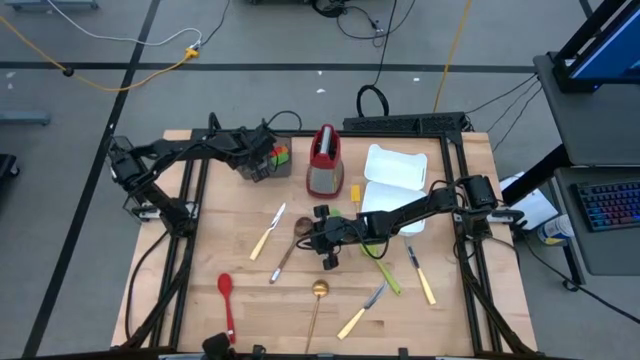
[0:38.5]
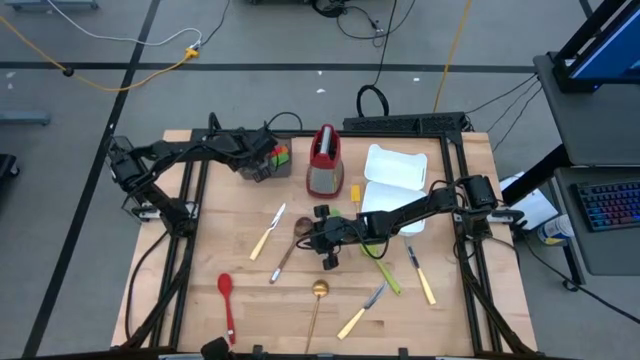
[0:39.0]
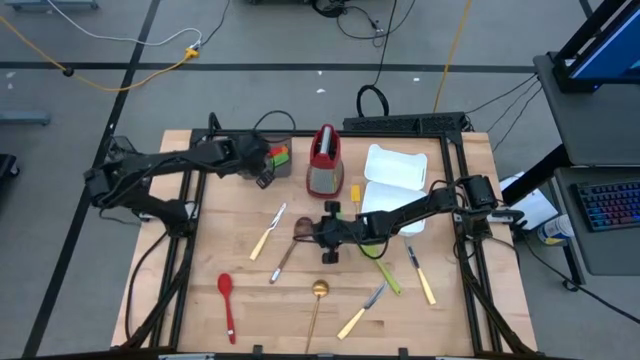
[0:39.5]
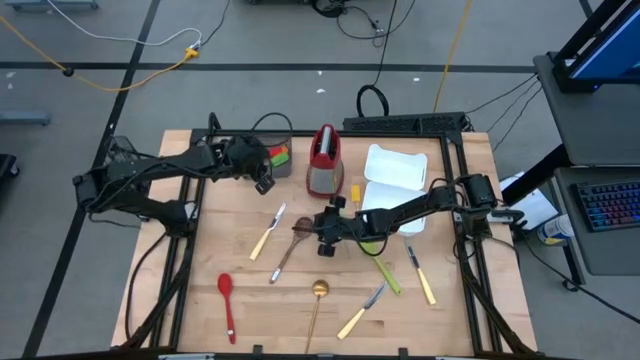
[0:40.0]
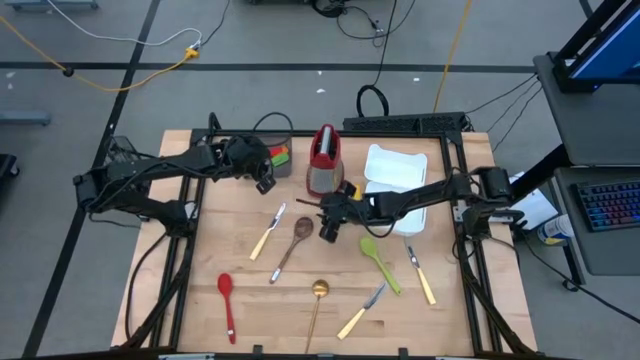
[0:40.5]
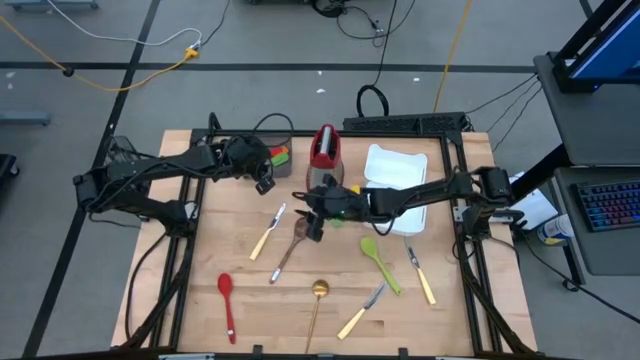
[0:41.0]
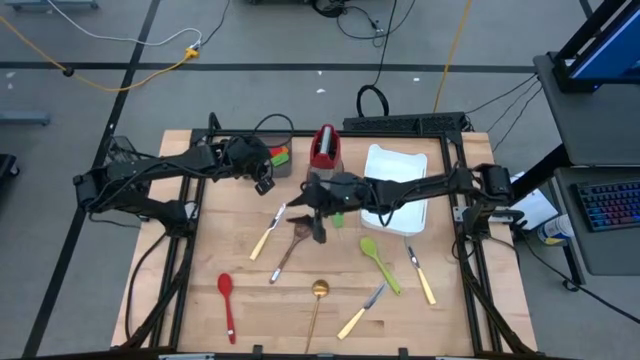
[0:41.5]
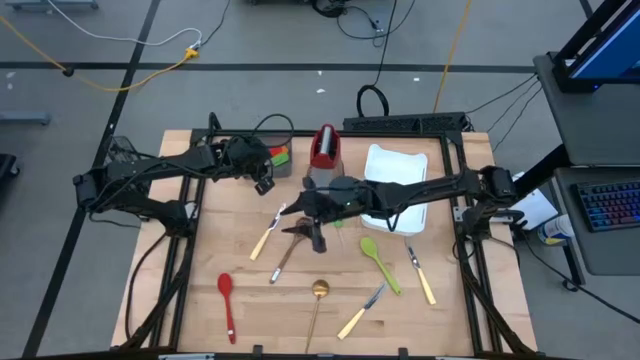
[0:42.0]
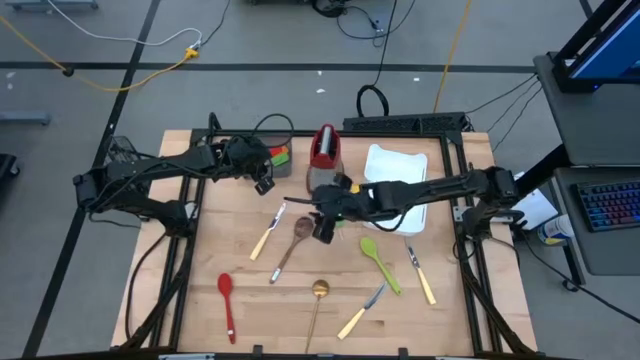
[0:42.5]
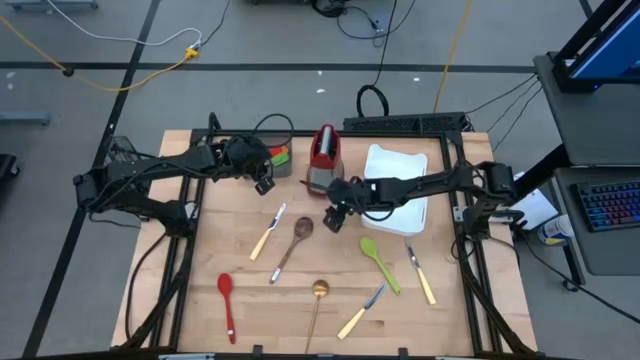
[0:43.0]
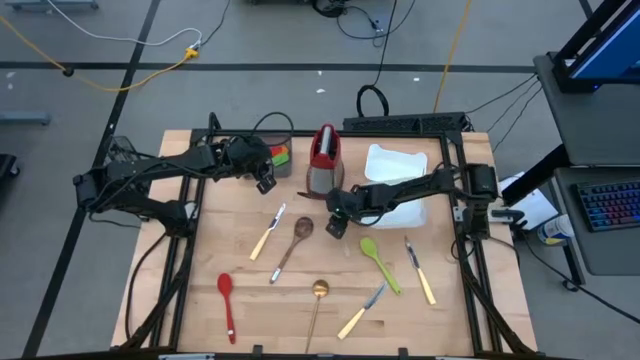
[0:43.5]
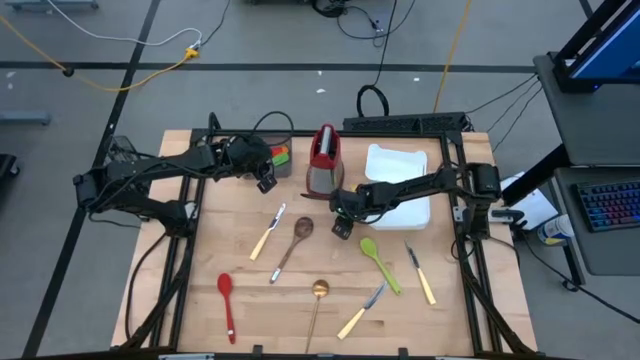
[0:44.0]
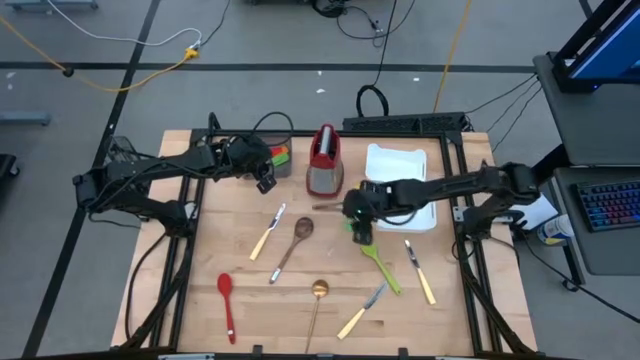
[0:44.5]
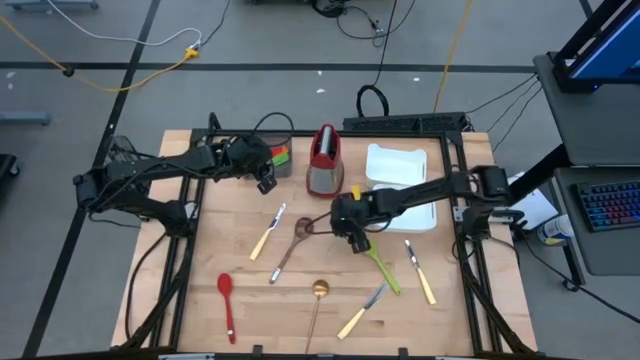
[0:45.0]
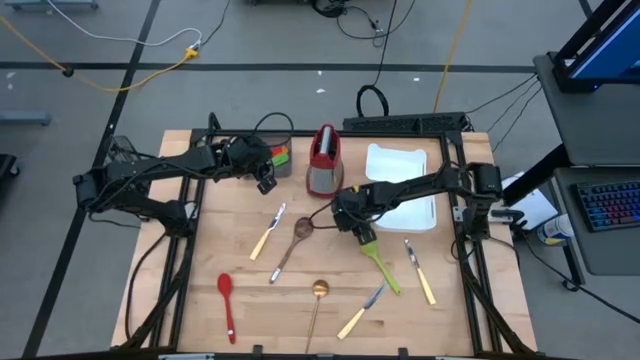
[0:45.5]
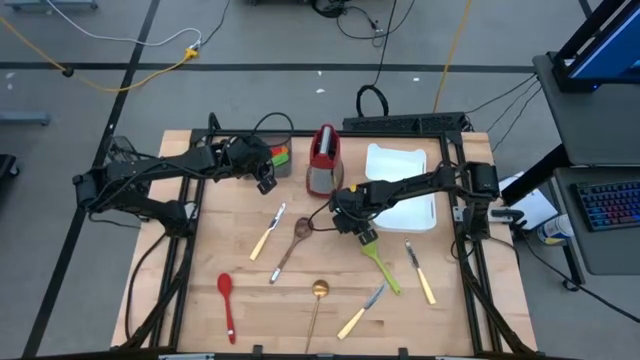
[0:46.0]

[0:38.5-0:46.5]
Task: Pick & Place Kitchen Items
Put the green spatula into the black bin

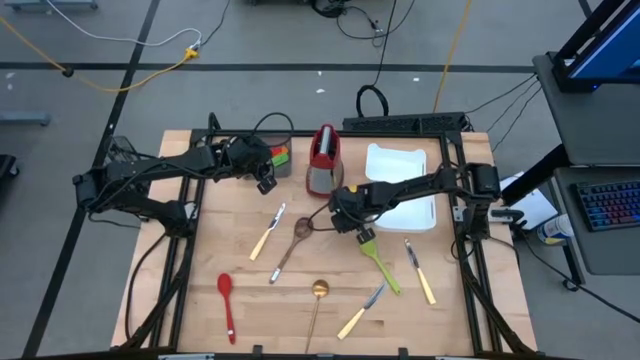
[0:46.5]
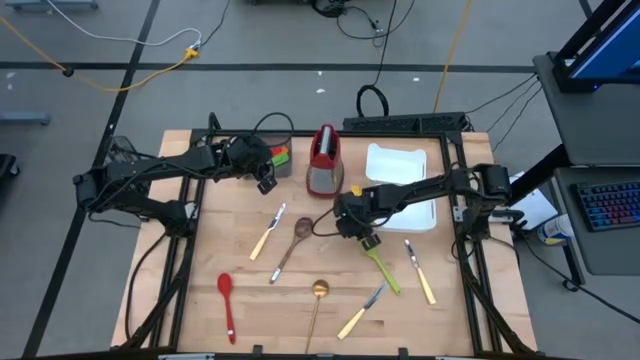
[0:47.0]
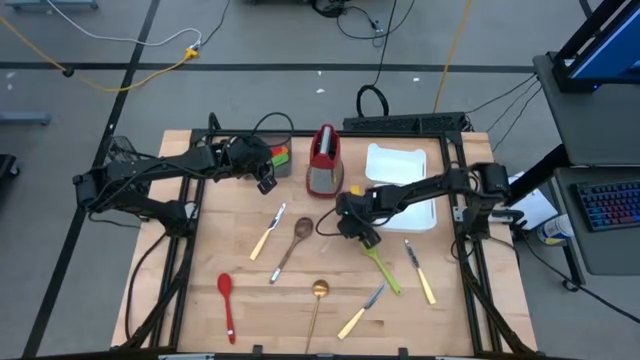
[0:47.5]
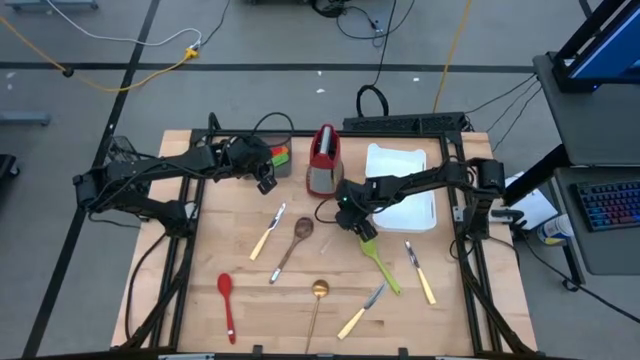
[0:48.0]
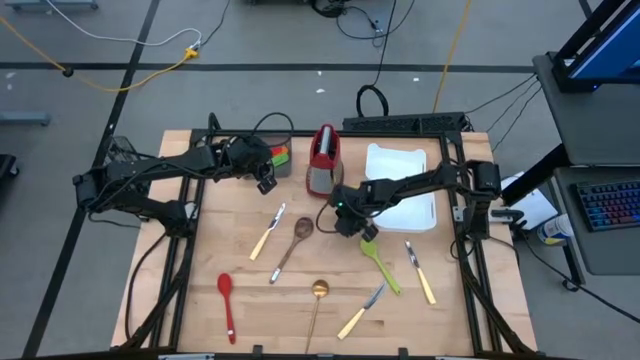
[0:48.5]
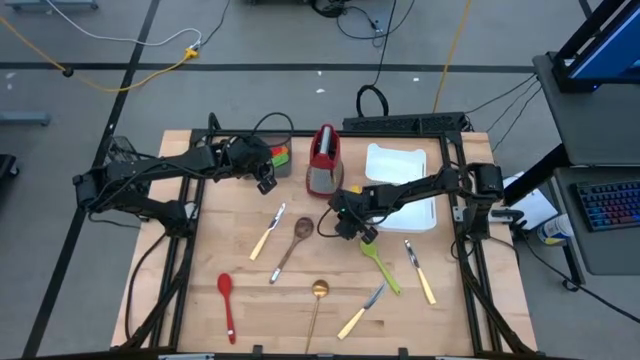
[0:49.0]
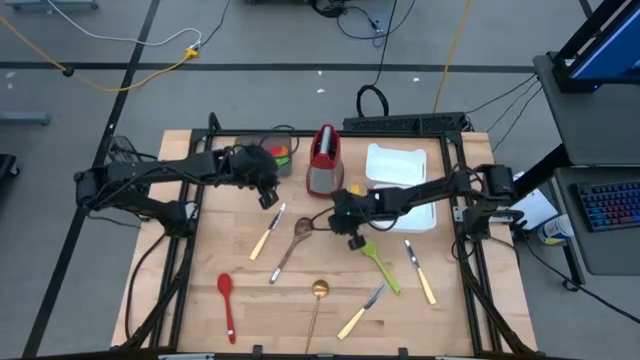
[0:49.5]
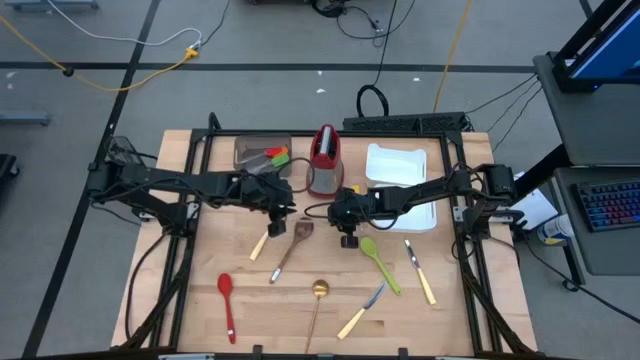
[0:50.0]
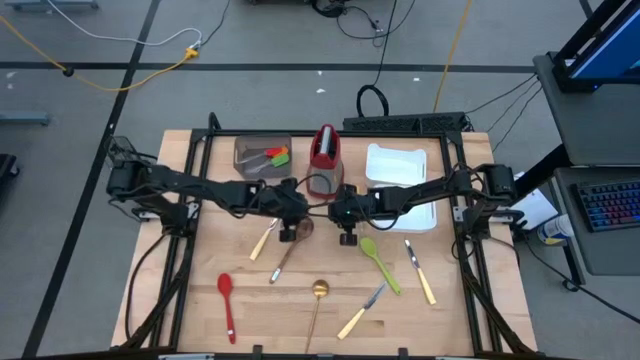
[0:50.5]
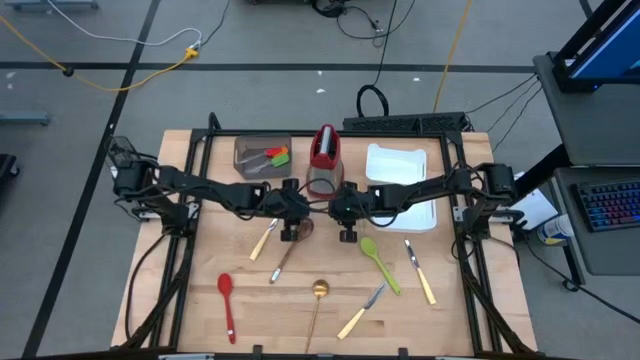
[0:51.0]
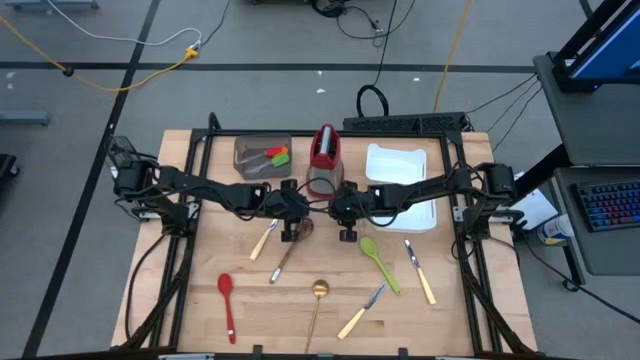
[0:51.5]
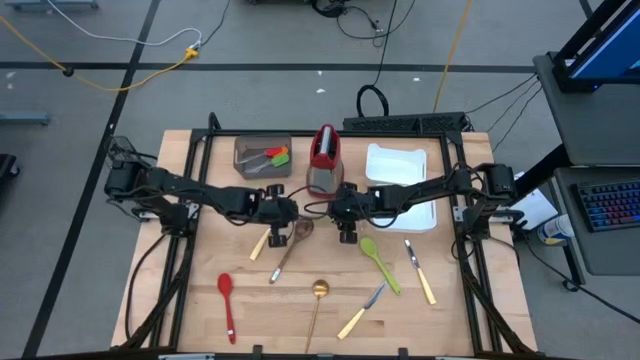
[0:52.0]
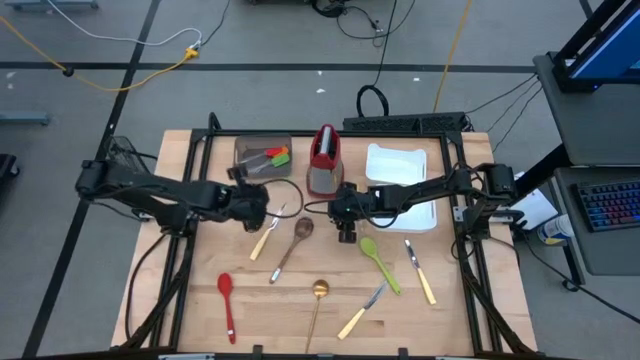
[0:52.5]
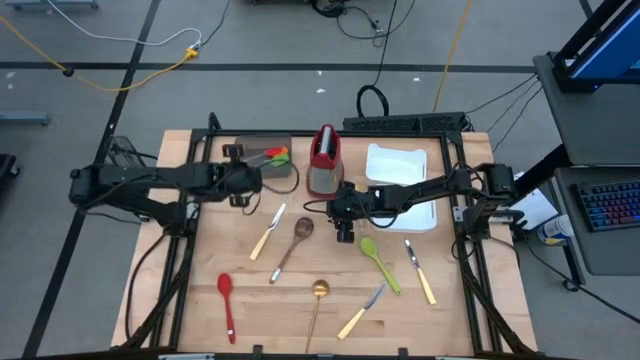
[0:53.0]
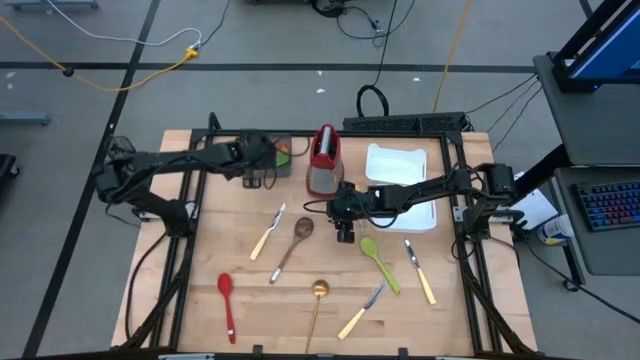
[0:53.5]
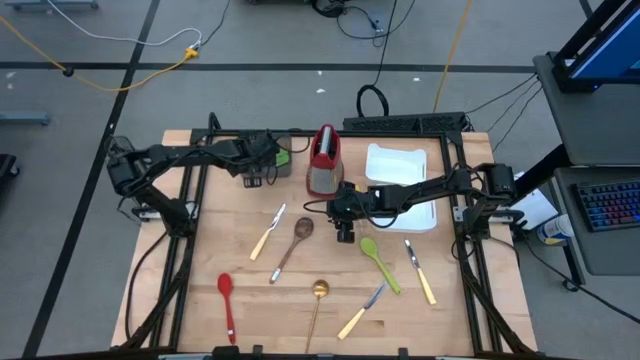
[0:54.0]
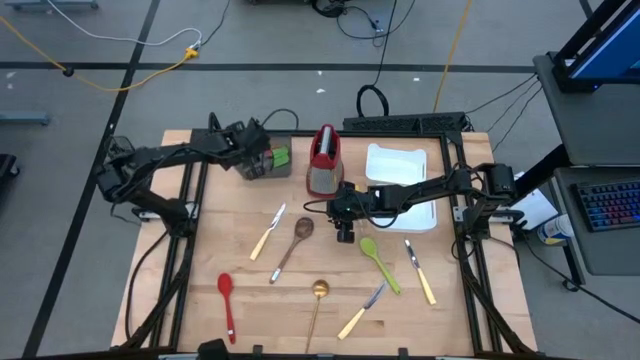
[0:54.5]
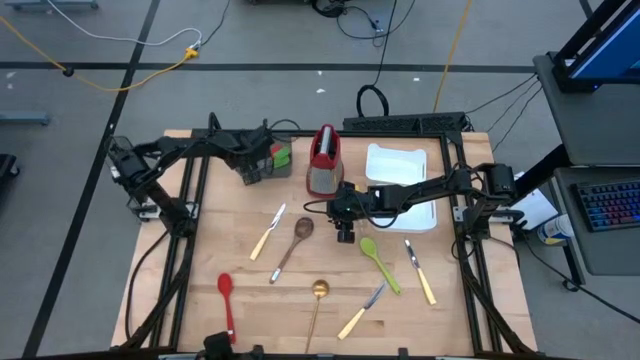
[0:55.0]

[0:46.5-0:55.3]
Put the green spatula into the black bin

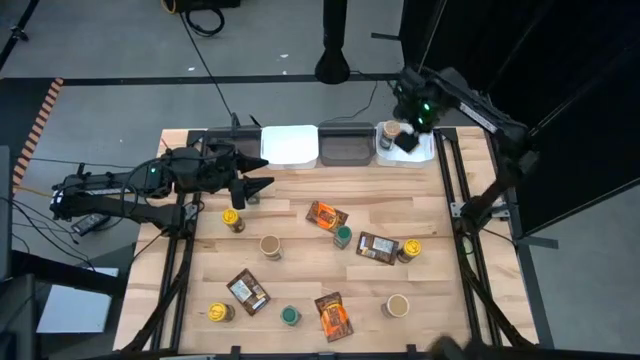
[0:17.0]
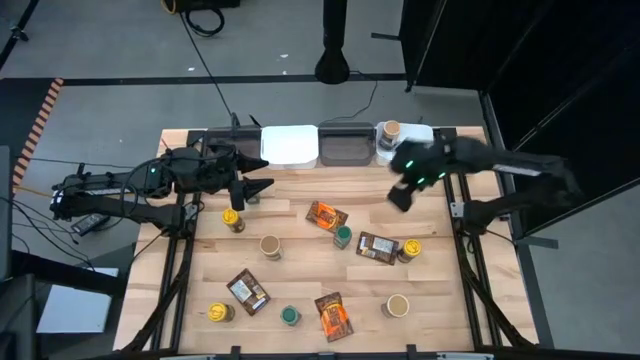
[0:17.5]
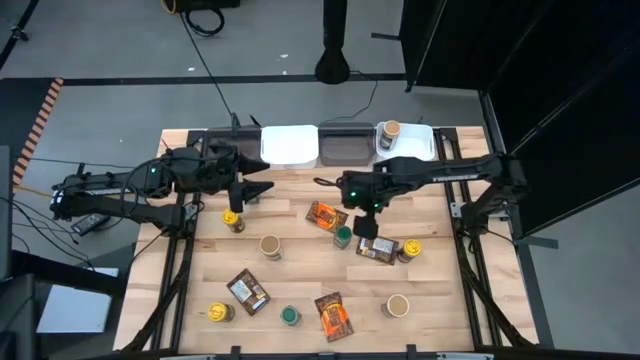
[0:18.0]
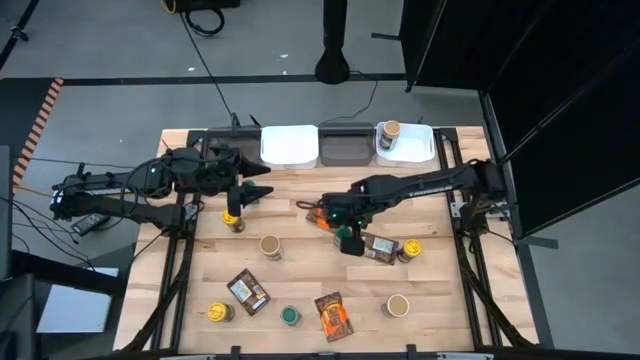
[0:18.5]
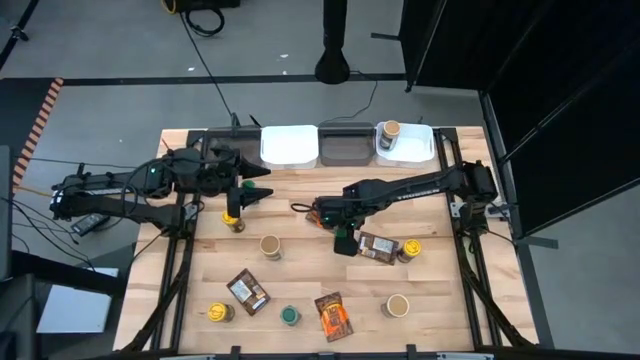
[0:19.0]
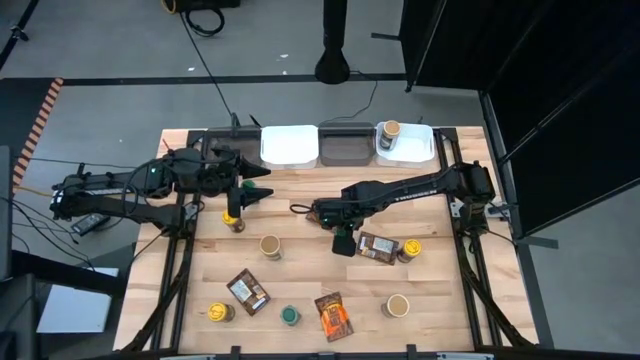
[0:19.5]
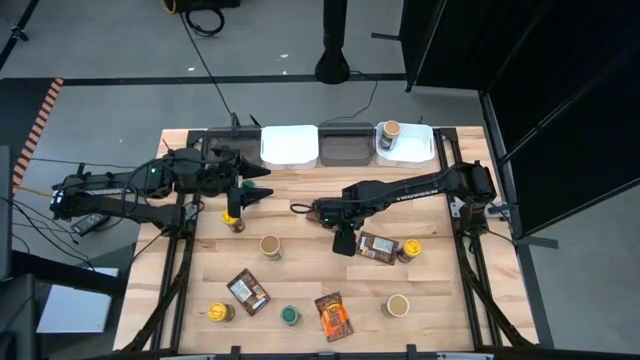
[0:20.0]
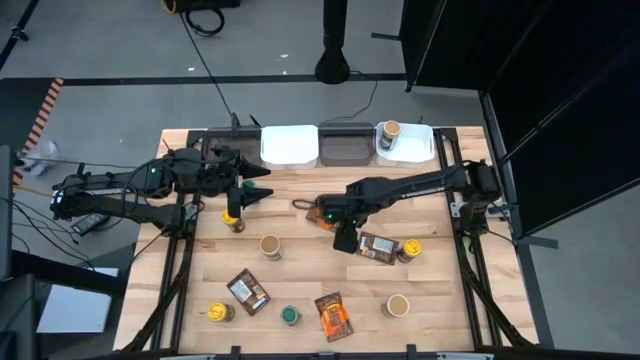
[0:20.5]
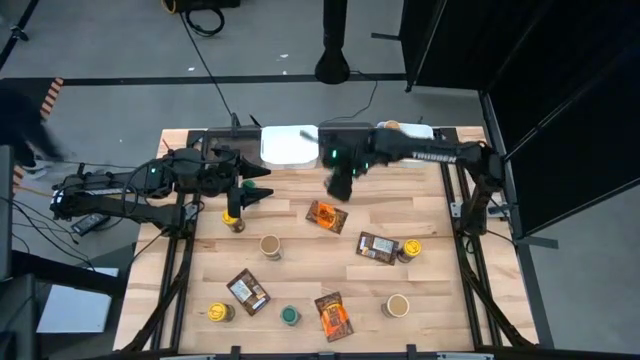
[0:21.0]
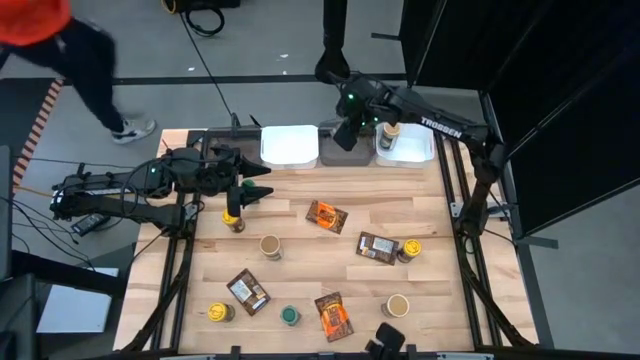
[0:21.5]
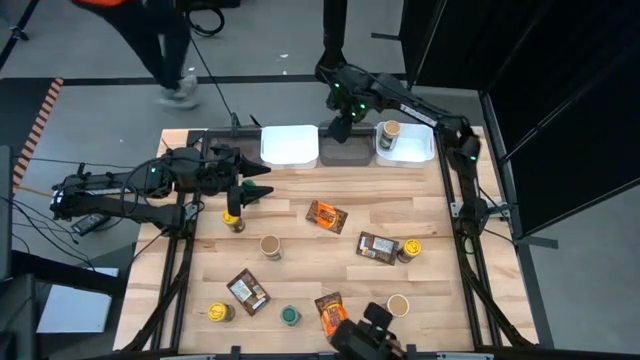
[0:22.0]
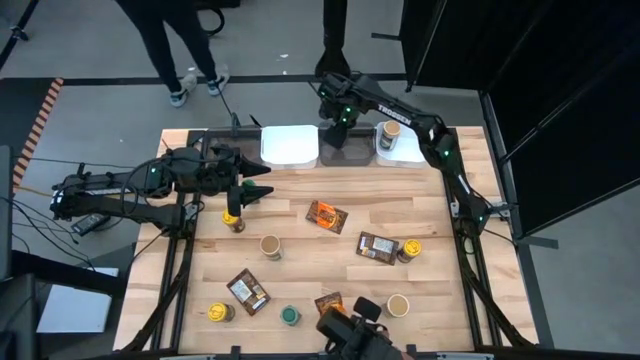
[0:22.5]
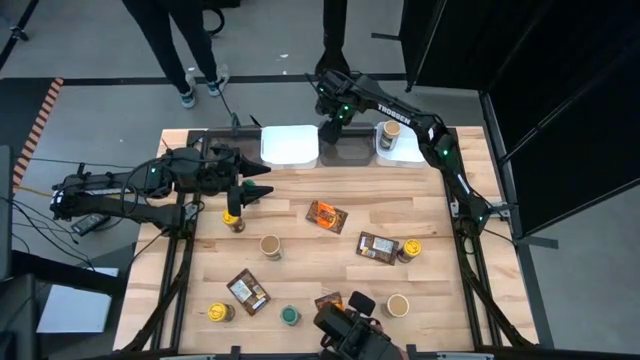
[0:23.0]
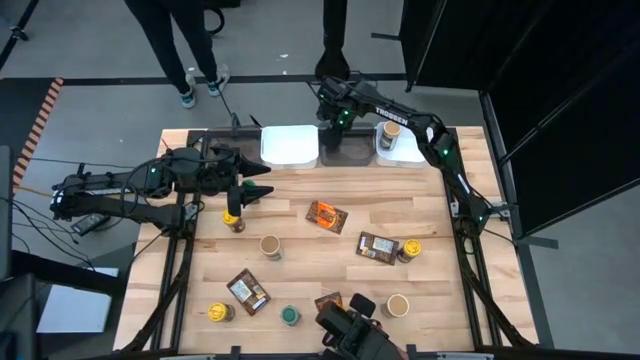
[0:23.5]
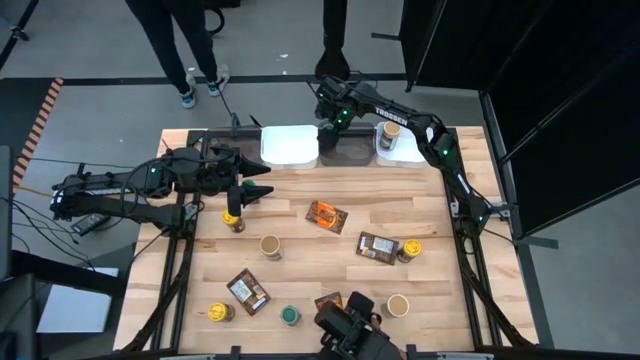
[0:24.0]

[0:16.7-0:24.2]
Task: Sort spices by type
Put the middle right green seasoning bottle into the right black bin
